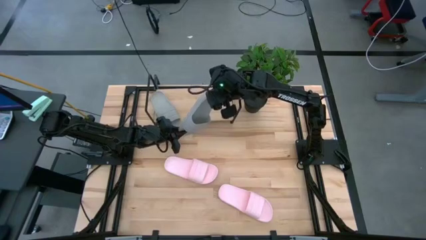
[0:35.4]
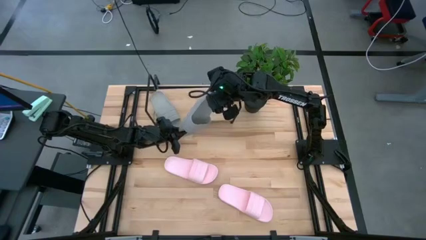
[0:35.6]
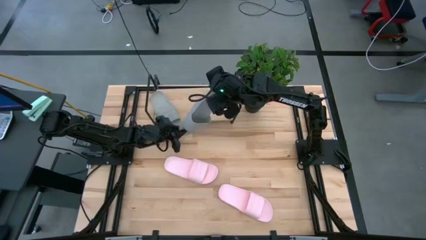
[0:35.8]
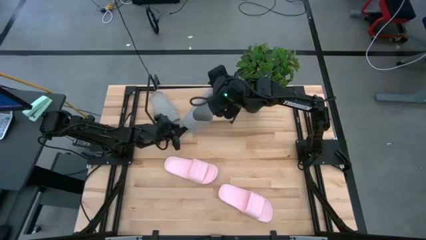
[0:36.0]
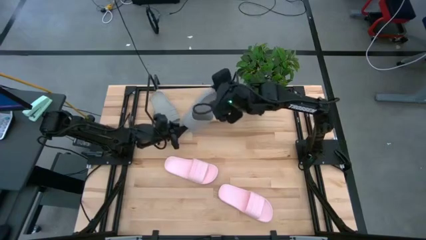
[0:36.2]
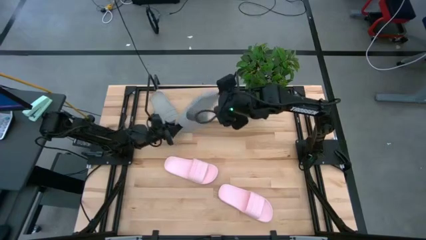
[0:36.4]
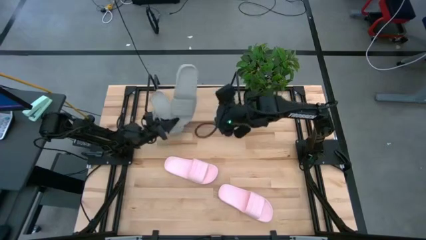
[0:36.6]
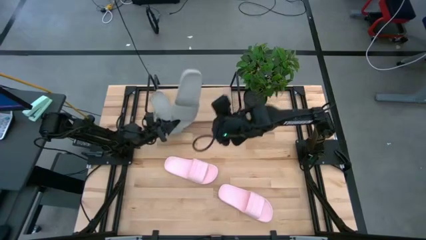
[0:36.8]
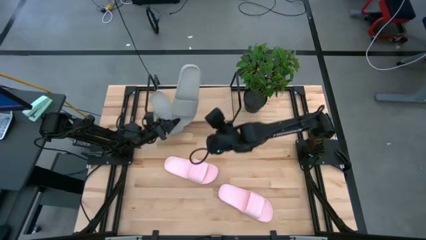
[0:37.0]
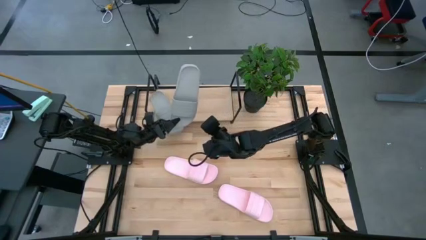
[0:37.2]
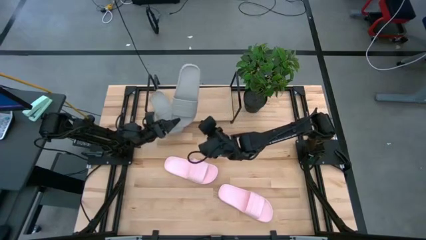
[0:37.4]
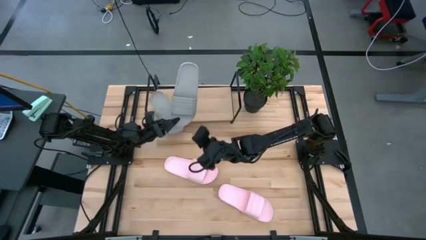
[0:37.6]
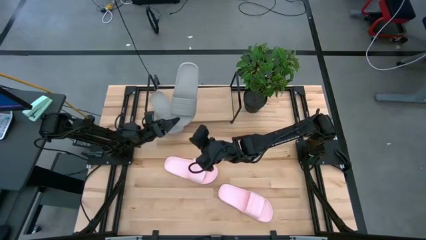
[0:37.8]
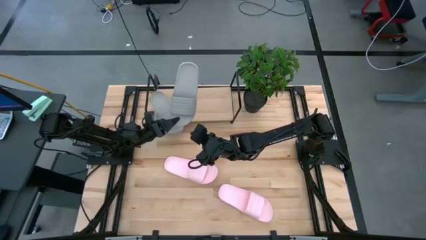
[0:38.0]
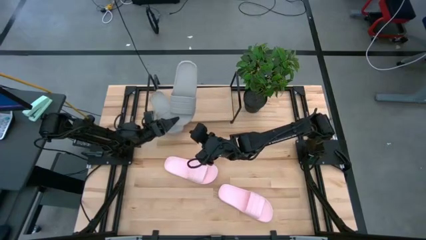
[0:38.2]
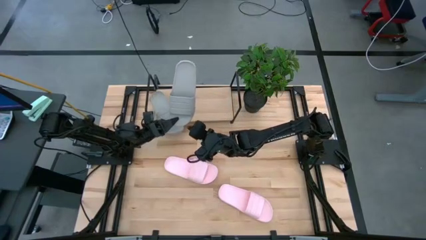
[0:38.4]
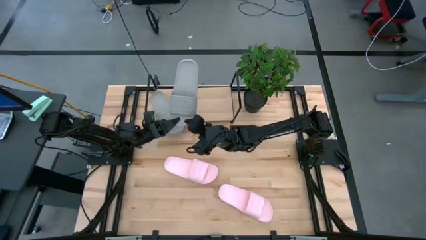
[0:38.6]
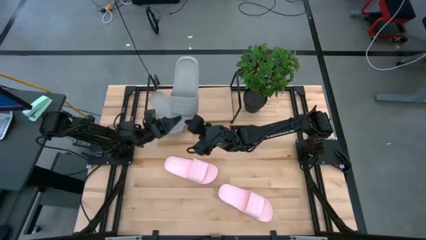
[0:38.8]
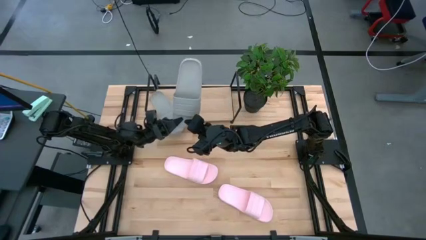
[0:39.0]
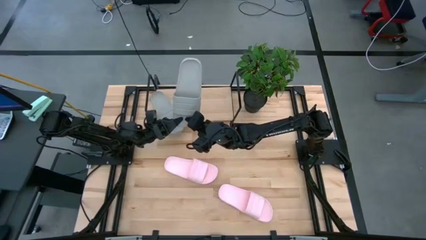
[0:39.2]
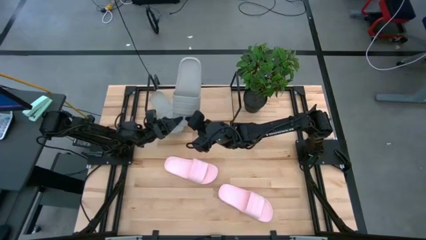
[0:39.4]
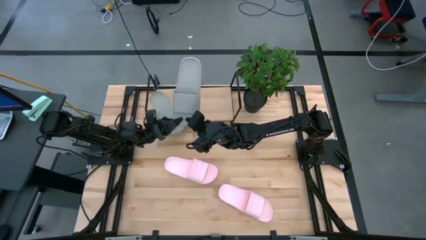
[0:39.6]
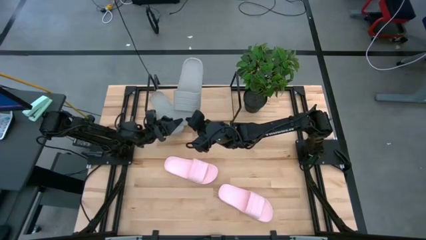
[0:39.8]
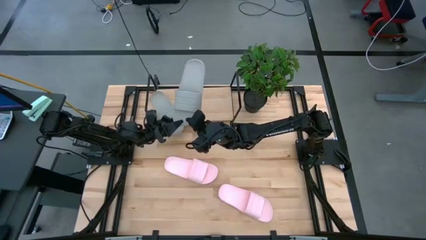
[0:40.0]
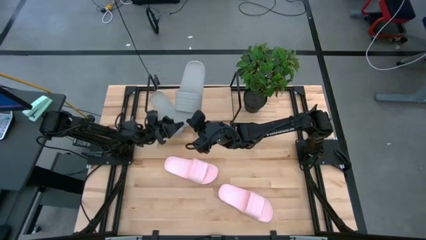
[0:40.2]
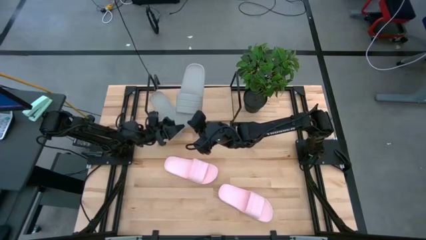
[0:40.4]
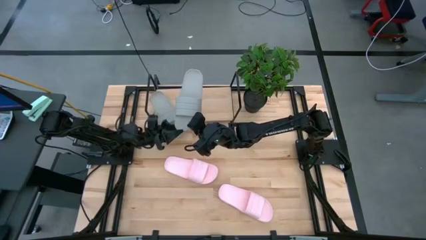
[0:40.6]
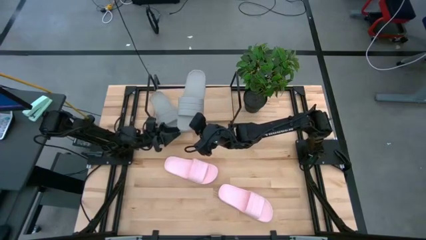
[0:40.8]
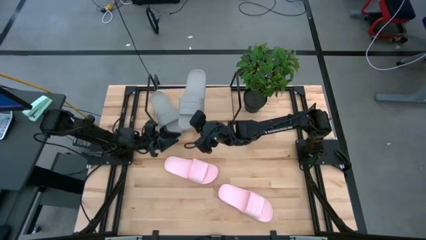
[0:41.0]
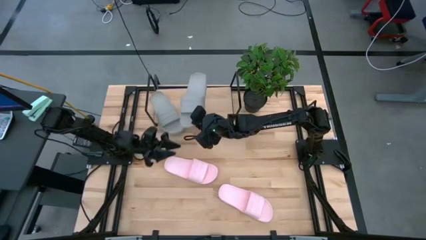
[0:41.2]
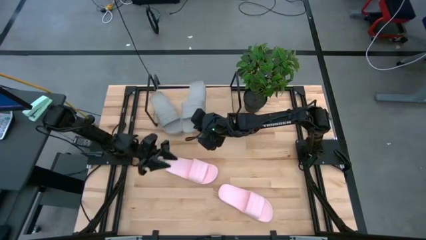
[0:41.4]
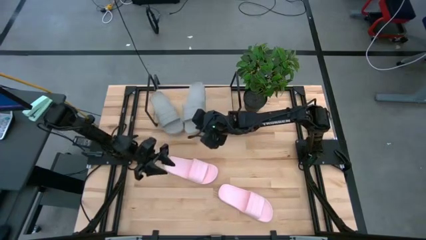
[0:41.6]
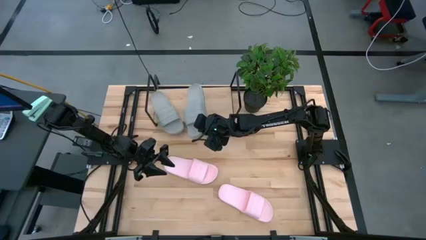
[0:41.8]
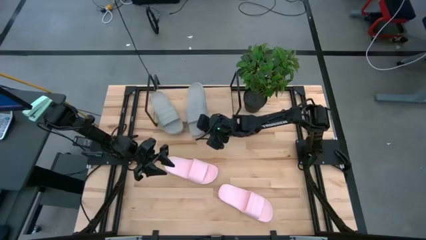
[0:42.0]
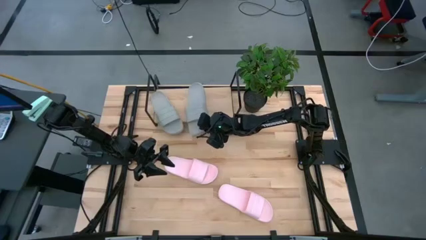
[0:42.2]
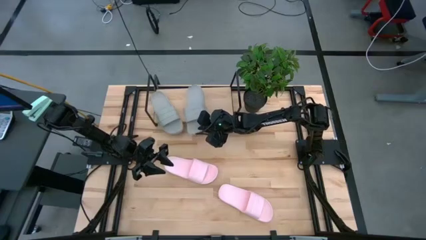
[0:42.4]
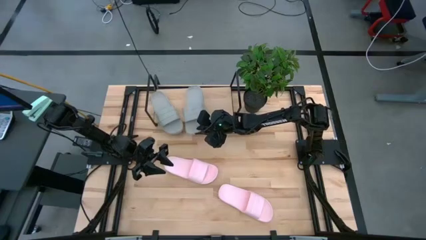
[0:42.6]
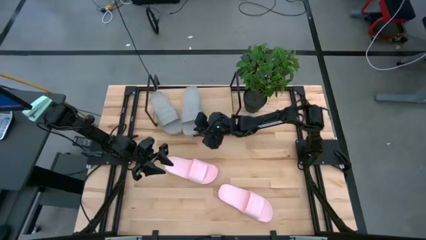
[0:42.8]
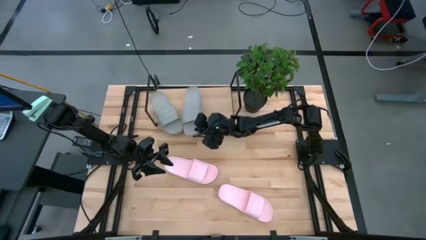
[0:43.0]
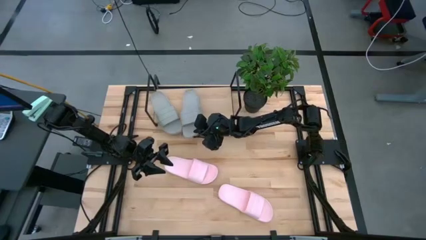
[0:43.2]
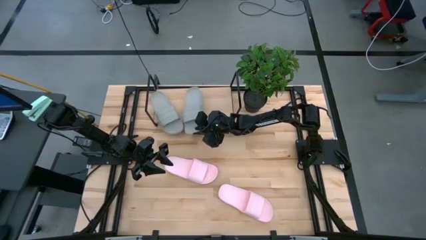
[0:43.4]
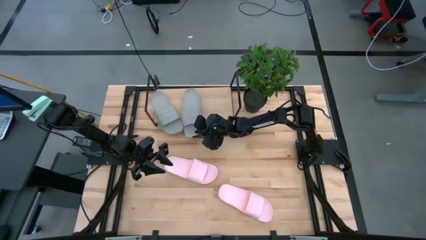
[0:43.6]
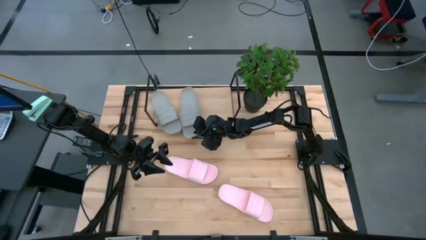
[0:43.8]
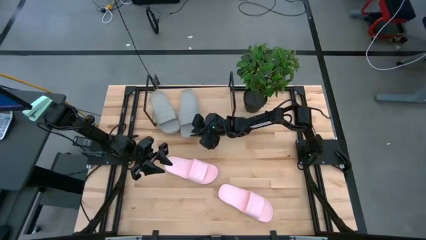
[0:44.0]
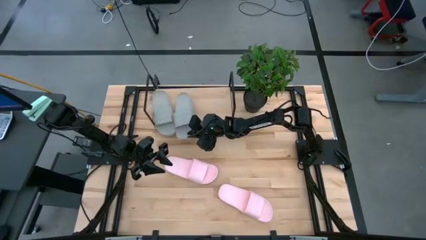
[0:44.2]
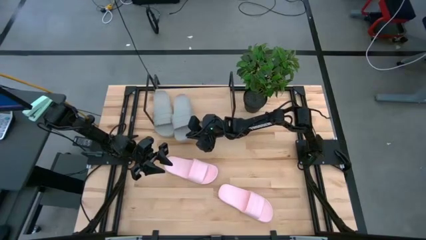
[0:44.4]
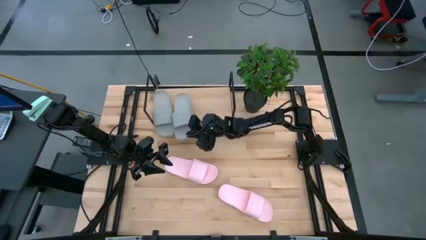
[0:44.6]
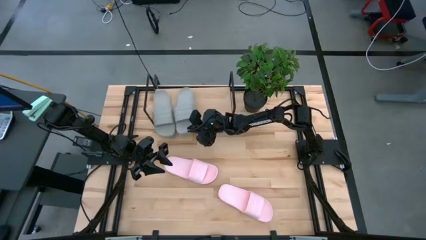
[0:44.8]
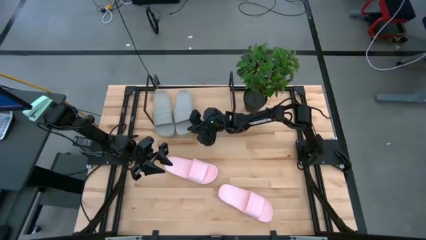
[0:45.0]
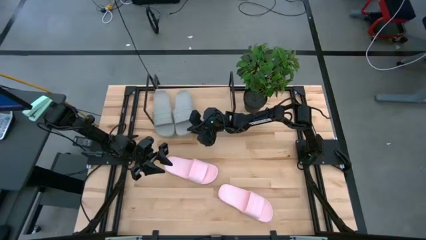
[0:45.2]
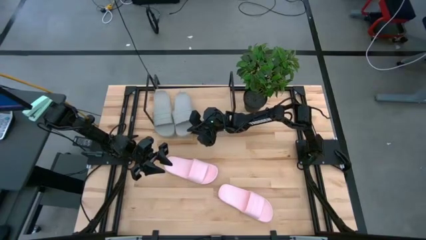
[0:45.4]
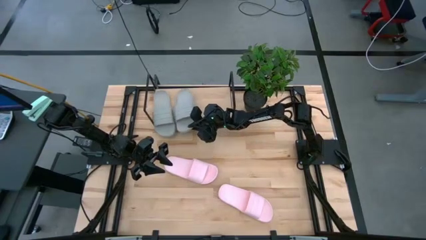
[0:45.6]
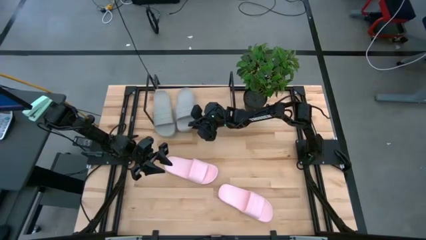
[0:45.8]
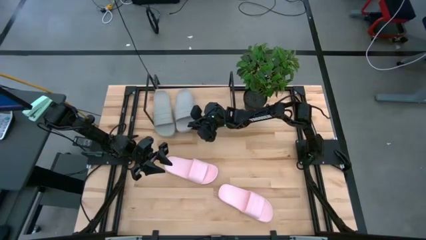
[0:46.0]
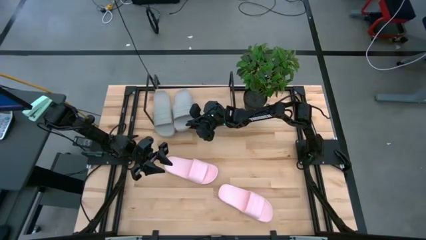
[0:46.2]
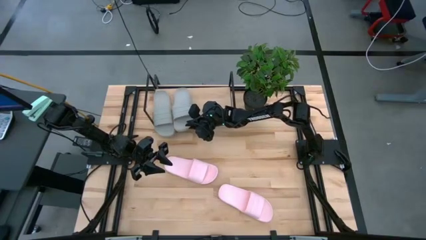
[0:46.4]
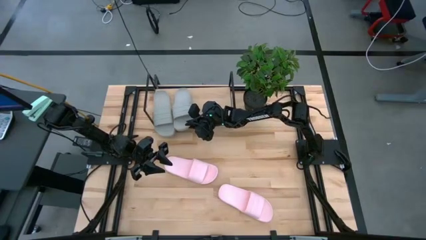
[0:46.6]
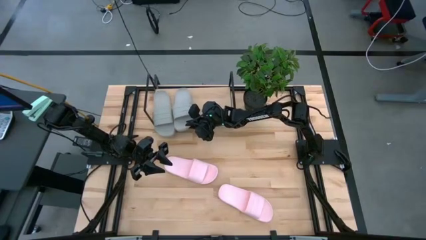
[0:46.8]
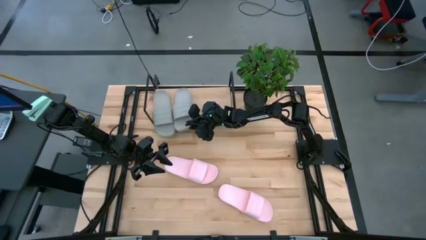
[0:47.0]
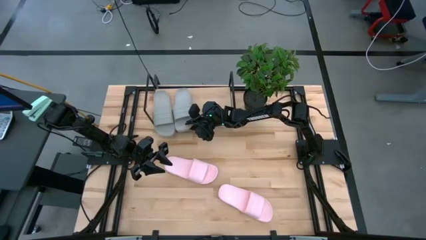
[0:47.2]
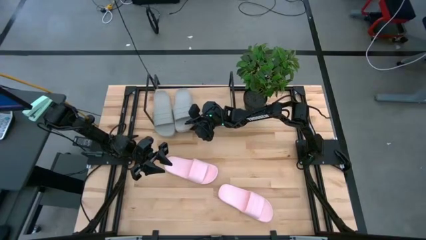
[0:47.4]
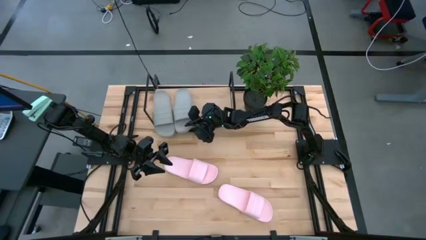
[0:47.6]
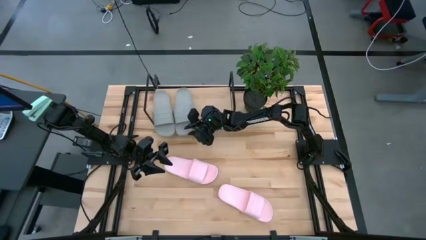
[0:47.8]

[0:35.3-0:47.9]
Task: Pick and place slides into the shelf
Put the gray slide on the shelf

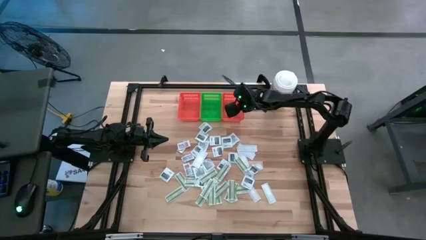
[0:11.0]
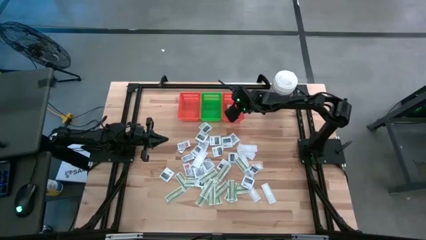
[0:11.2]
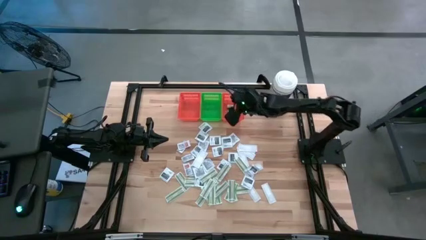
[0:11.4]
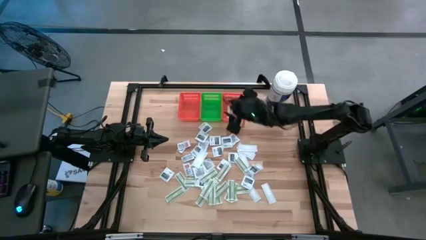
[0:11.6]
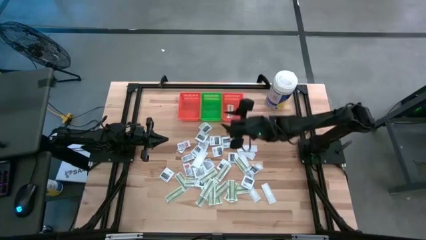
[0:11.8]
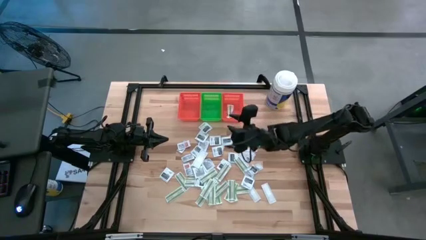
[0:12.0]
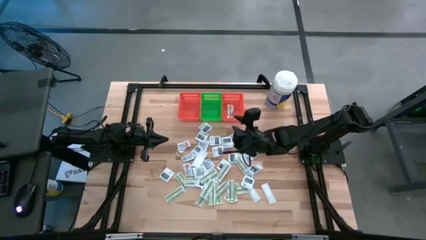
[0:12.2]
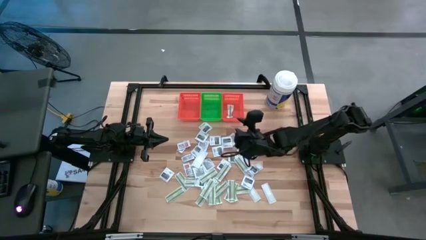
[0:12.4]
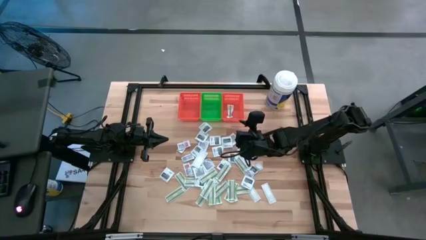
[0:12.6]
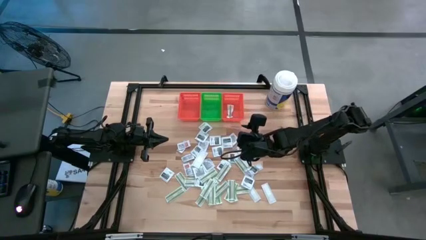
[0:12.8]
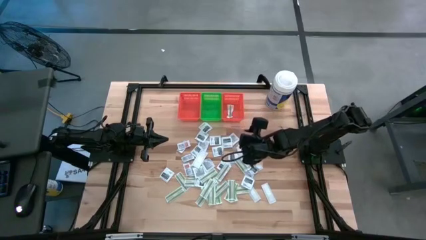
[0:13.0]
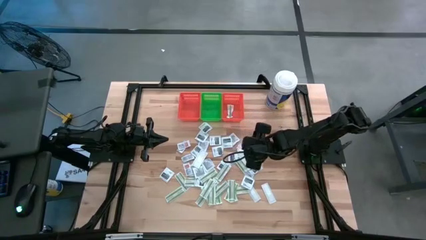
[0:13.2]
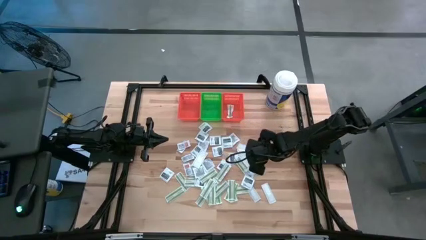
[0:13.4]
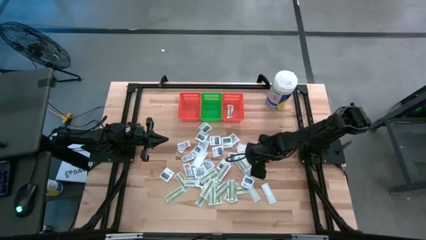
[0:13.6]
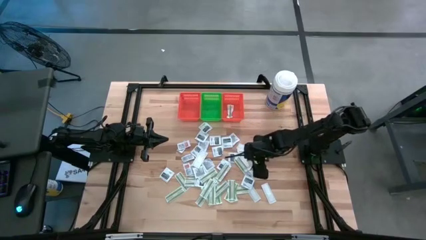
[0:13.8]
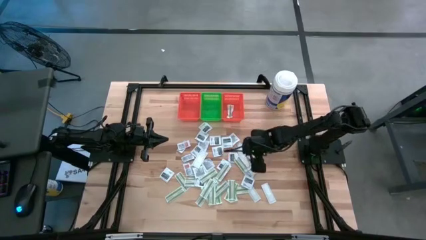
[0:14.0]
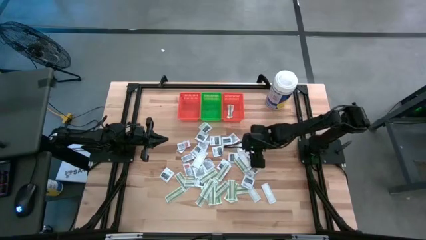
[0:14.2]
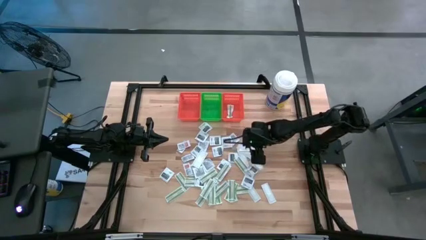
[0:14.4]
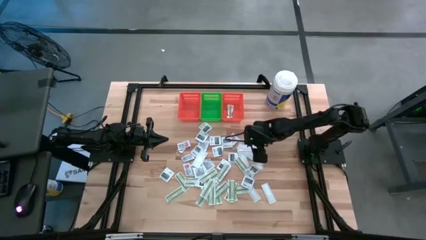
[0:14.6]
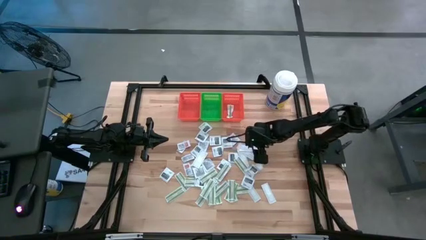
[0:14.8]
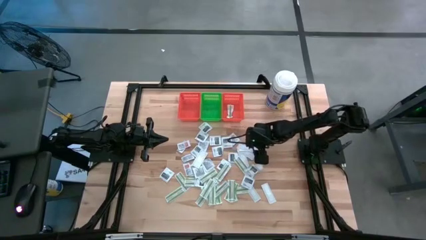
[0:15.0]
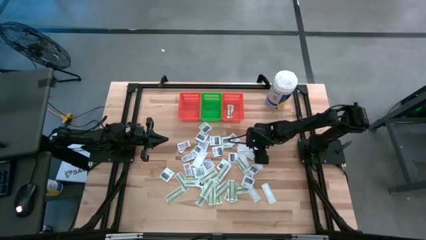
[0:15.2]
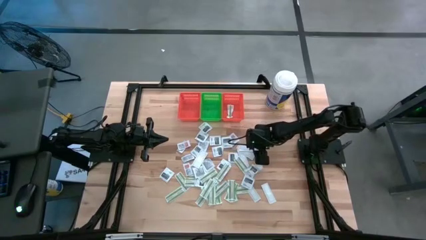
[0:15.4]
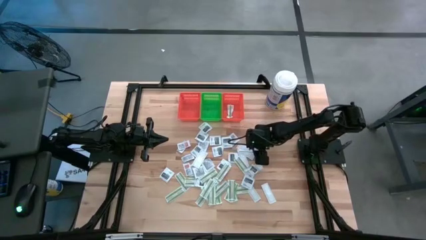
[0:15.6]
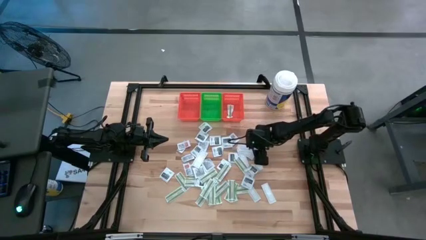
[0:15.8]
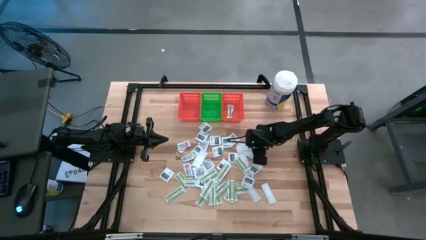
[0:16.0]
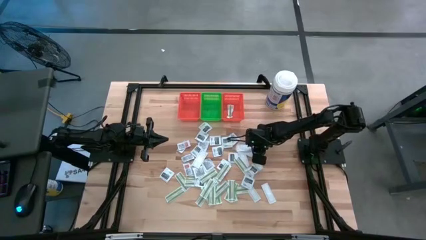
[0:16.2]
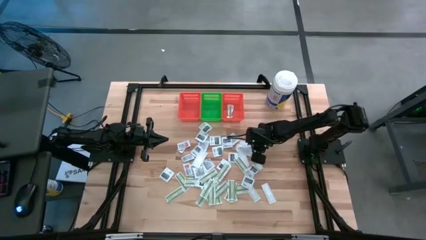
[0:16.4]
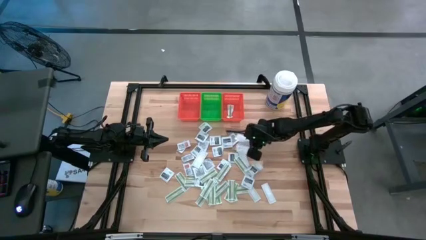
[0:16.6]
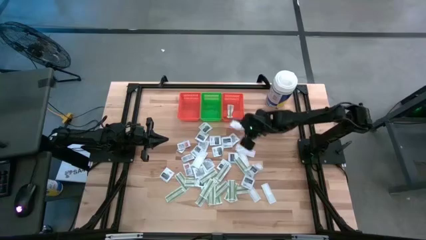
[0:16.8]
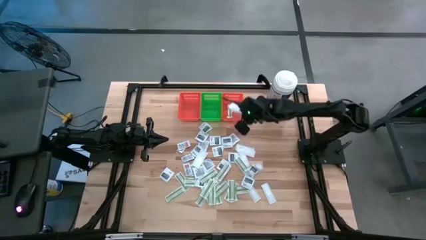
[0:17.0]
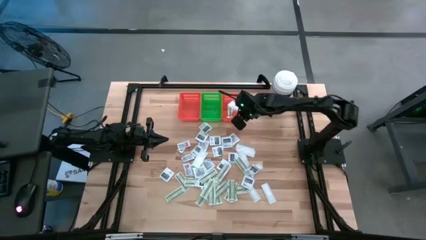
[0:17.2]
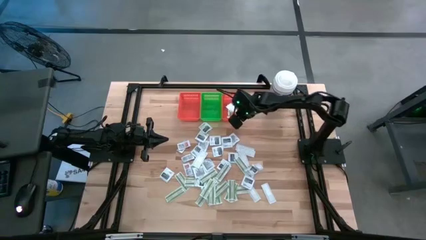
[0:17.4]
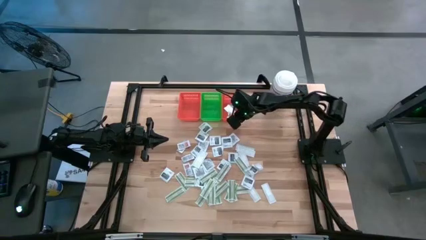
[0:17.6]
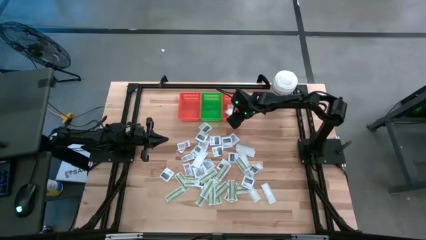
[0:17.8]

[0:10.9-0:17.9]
Task: Pick & Place First Aid Supplies
Put the bandage pack into the right orange bin
